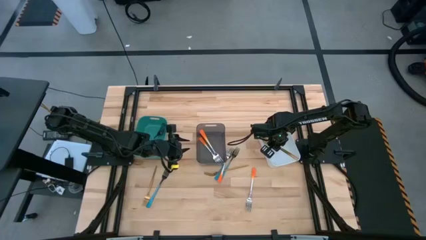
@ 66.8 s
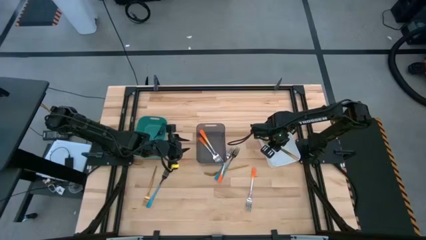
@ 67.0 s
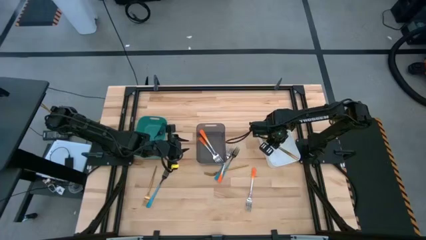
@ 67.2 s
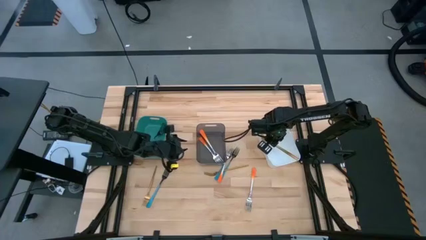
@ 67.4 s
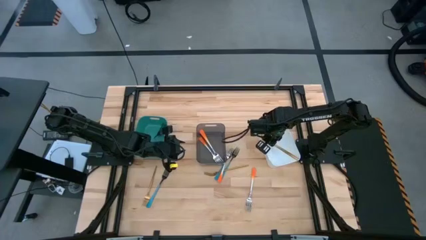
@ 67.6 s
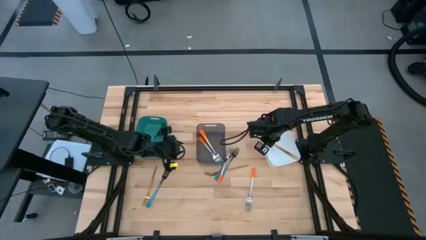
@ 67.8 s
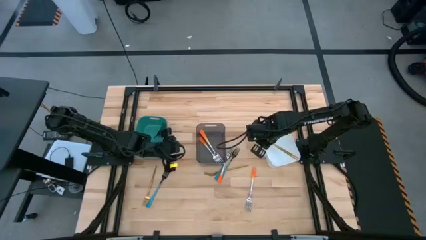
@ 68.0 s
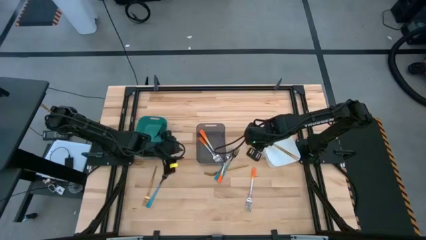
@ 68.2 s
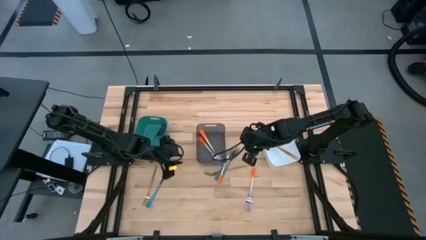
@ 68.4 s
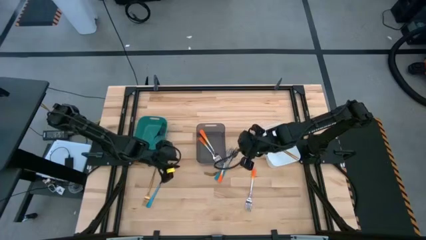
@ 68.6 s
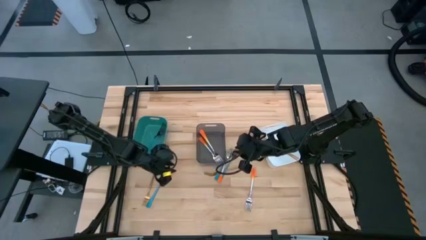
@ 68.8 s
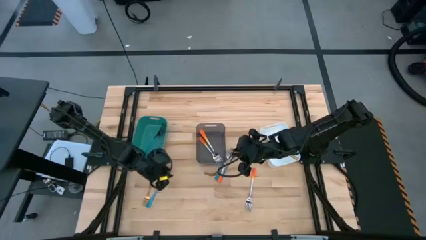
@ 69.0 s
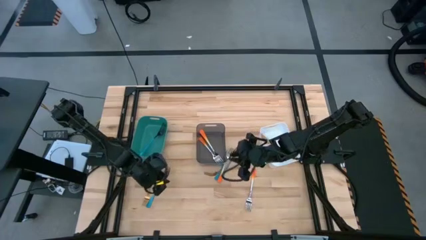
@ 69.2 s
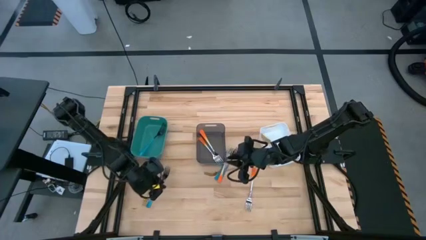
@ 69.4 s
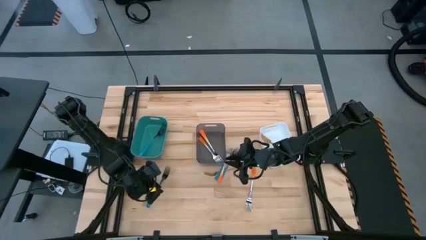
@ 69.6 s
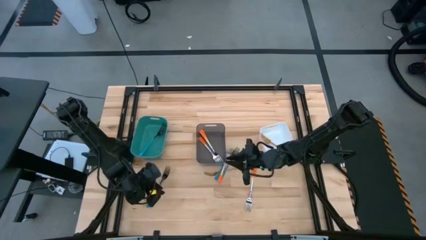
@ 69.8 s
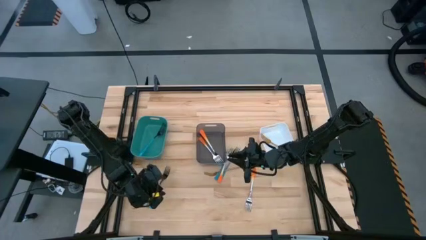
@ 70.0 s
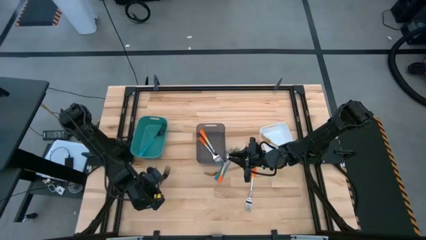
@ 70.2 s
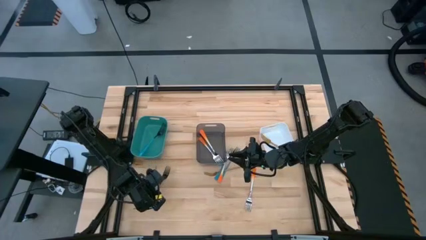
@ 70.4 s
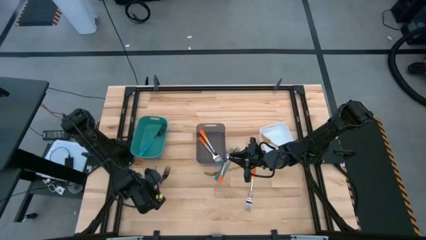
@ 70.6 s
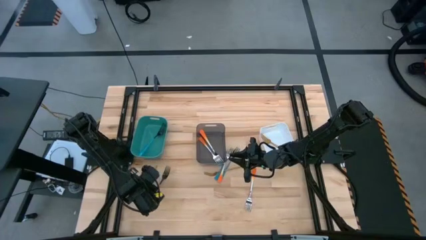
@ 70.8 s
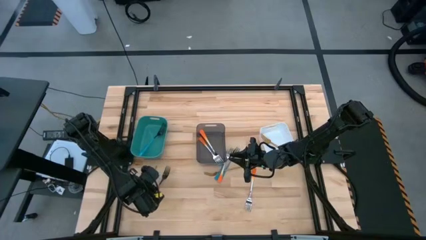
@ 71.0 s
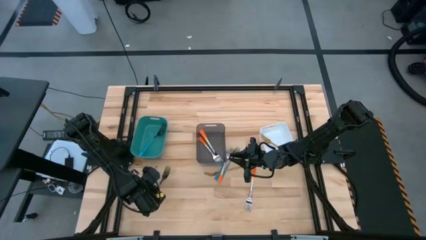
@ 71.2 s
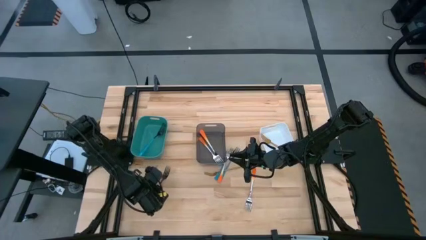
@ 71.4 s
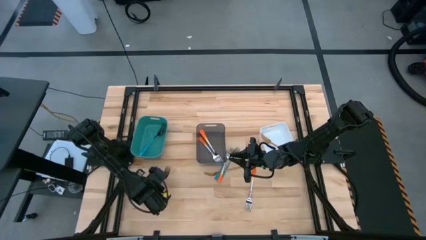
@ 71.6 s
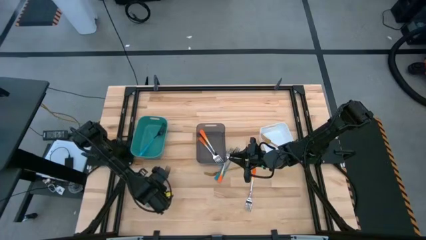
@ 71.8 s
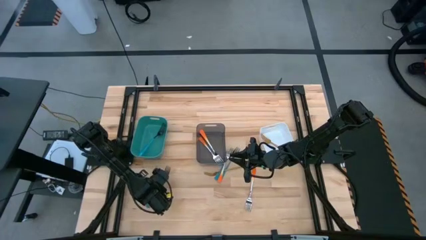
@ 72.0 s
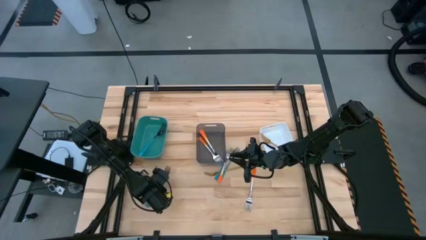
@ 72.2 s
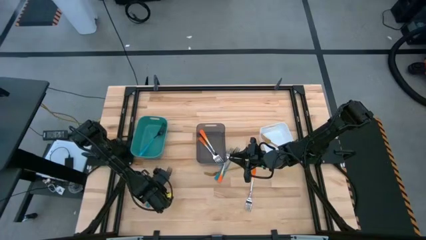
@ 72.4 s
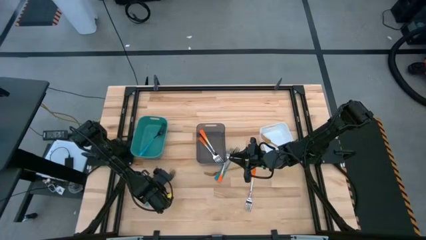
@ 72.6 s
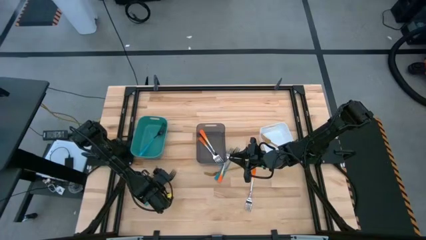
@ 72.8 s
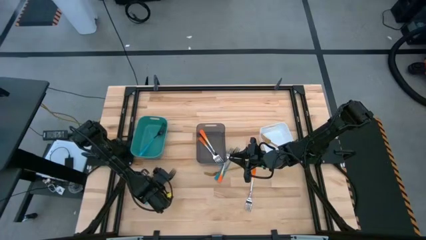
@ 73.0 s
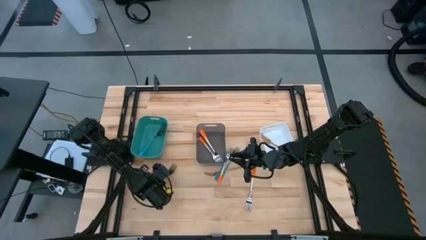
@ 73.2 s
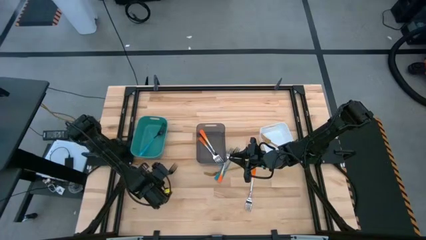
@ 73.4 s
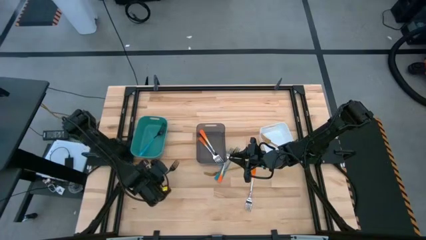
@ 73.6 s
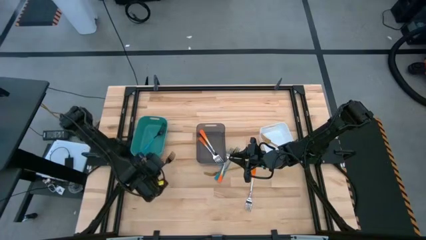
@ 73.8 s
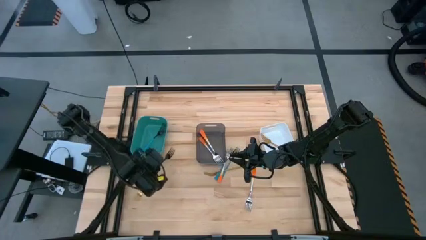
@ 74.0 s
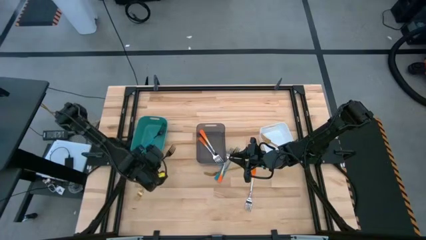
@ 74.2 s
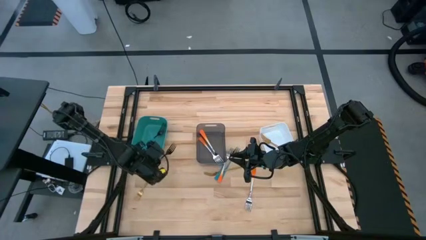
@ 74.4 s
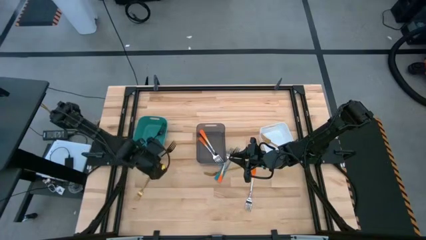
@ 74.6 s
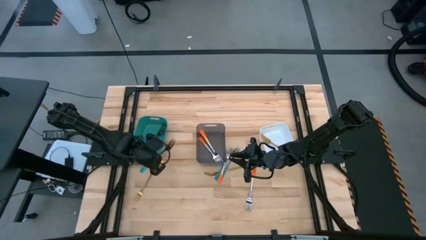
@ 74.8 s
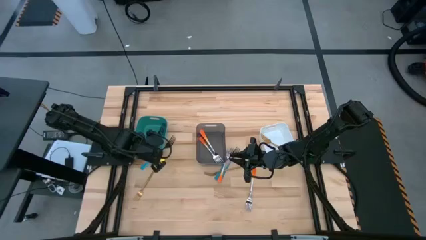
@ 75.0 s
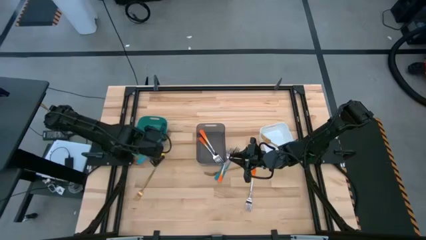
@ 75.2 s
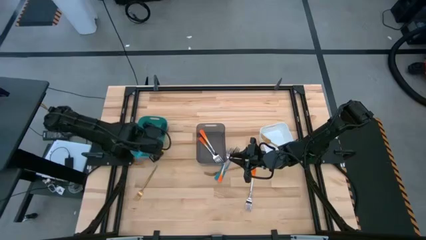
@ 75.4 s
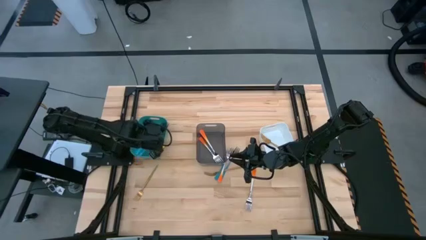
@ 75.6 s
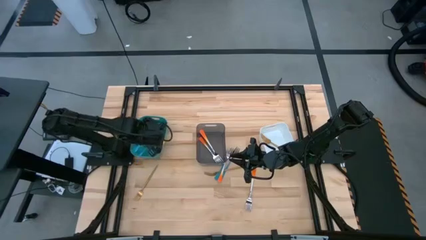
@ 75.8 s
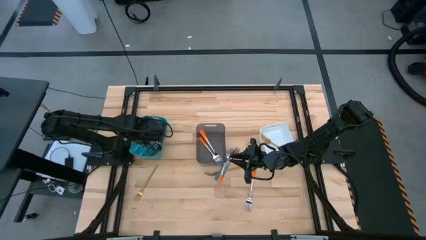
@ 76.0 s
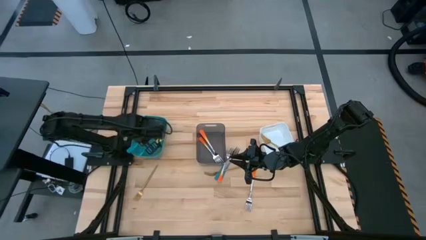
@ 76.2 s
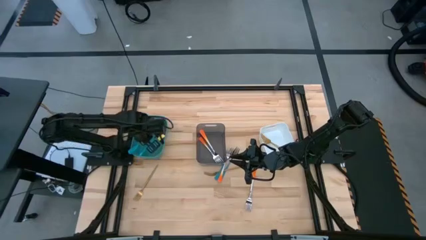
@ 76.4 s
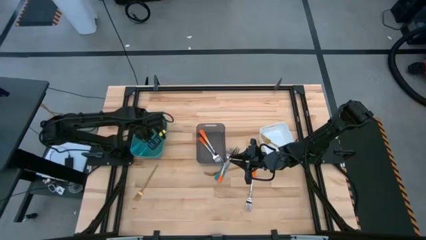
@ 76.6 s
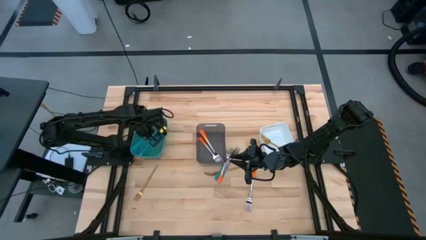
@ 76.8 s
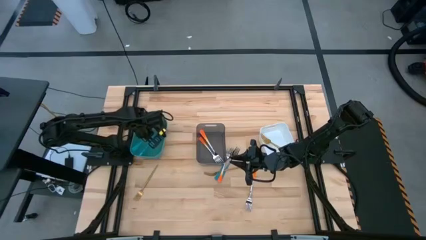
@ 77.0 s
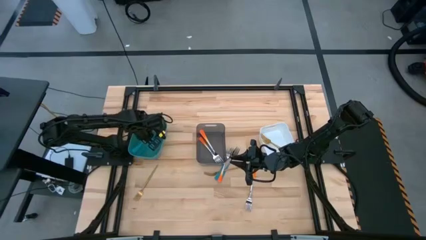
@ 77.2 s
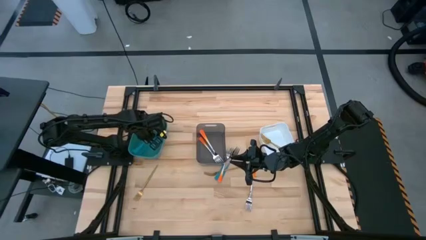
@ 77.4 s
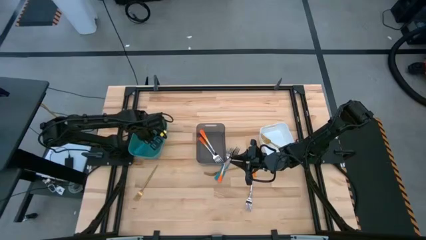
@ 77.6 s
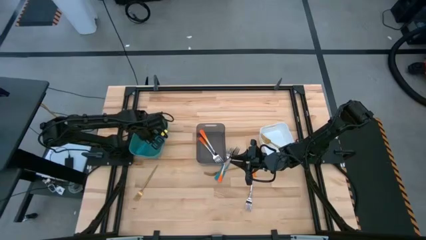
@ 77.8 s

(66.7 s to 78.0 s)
Task: Sort silverware by color (type)
Put the blue fork into the green bin

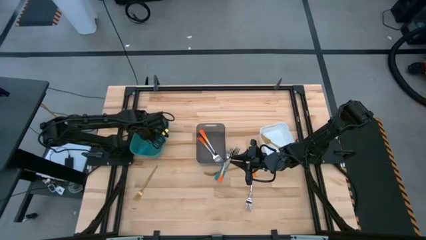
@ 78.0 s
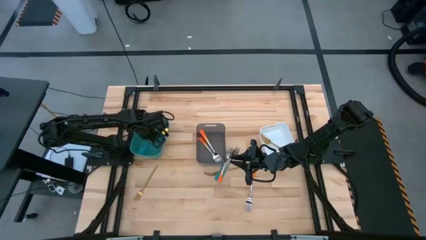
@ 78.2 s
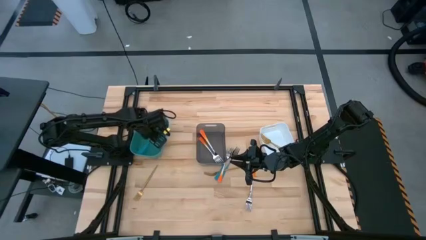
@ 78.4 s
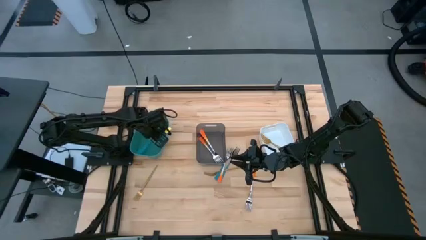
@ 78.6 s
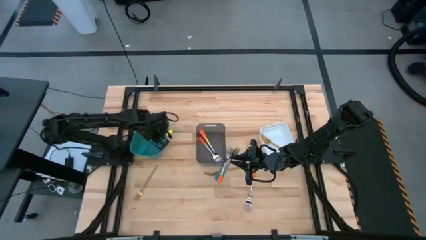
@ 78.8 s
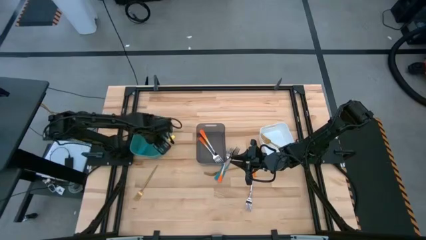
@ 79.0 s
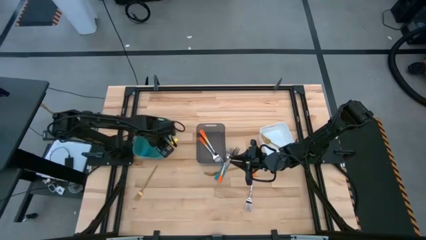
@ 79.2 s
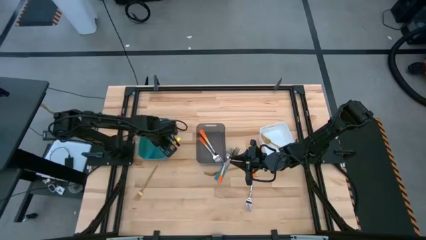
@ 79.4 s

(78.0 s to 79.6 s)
Adjust the green bin

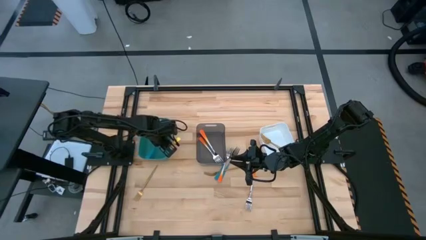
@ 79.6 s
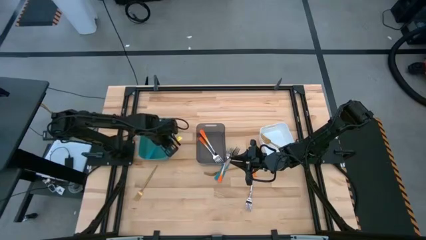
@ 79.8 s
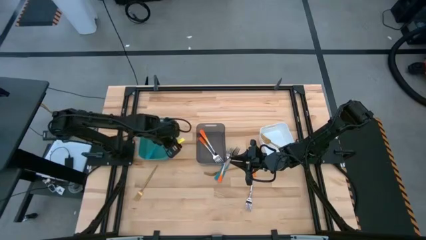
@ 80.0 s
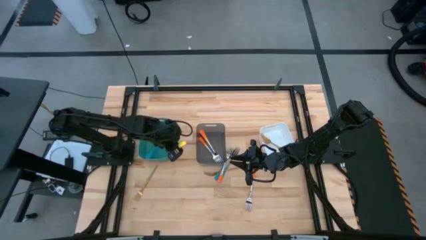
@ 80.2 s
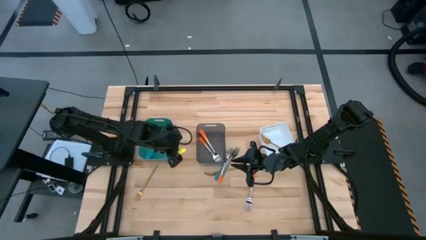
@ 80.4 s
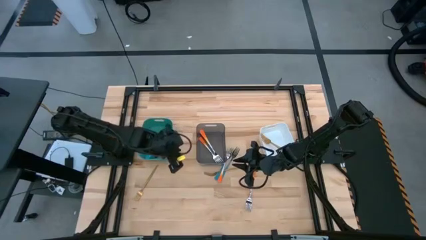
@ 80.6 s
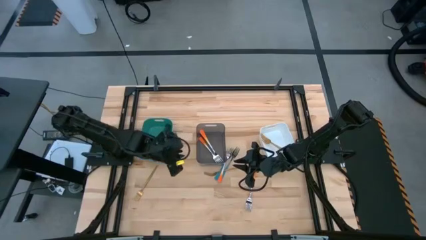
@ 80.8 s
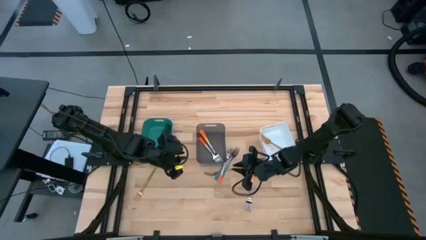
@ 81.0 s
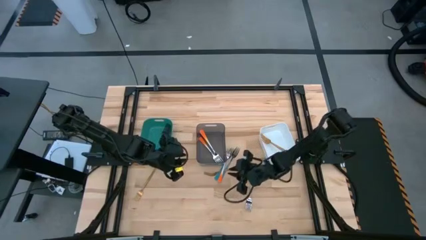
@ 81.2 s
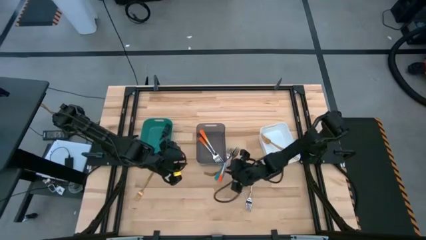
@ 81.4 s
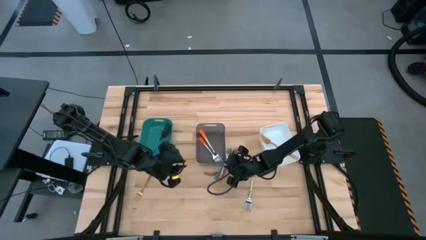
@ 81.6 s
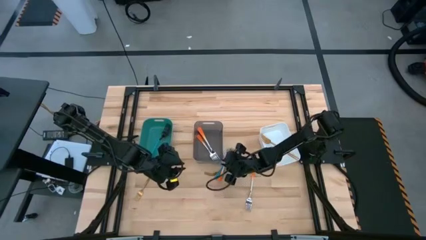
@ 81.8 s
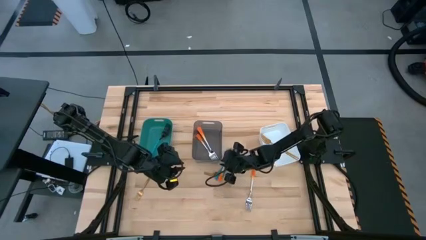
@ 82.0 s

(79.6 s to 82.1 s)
Adjust the black bin
